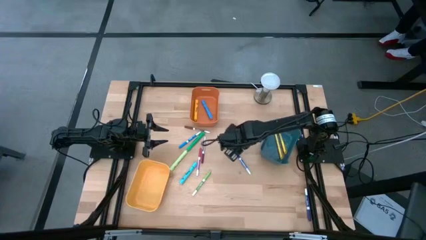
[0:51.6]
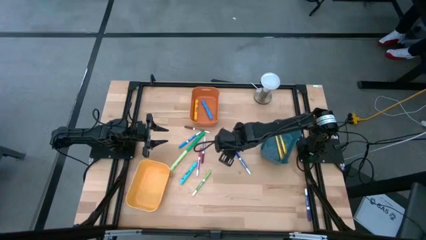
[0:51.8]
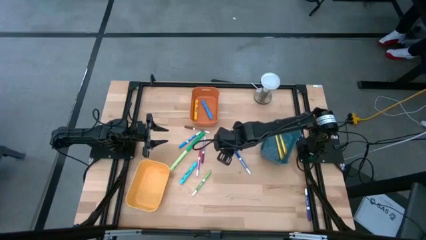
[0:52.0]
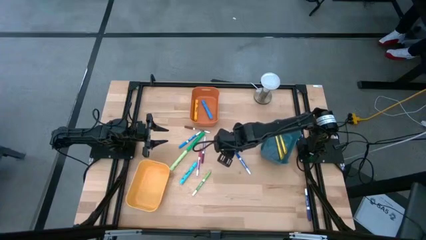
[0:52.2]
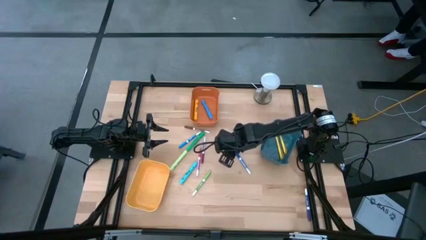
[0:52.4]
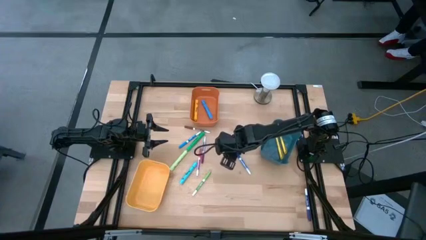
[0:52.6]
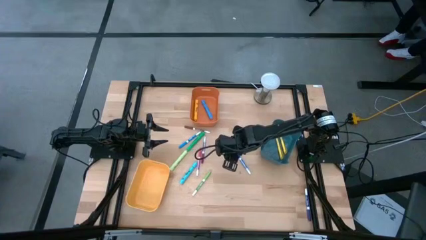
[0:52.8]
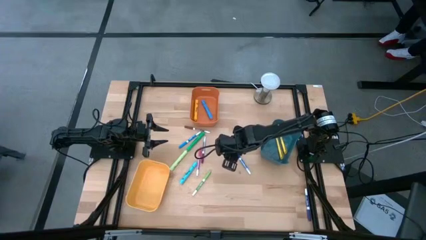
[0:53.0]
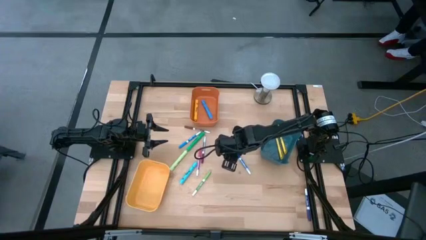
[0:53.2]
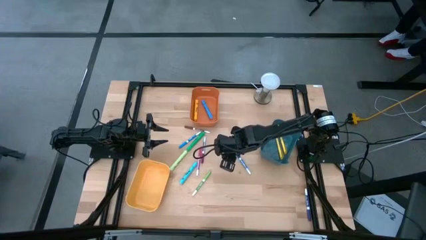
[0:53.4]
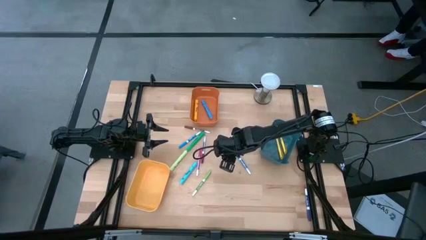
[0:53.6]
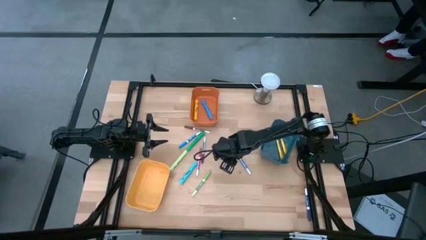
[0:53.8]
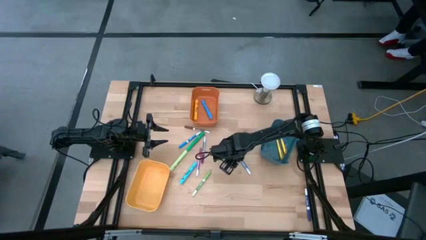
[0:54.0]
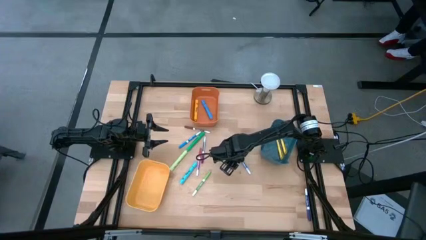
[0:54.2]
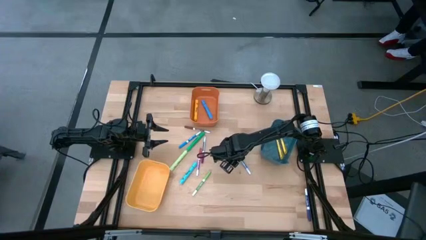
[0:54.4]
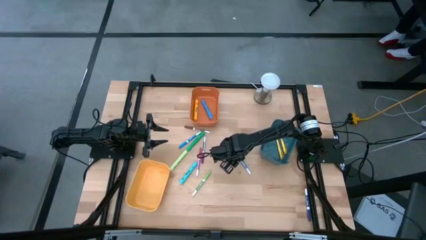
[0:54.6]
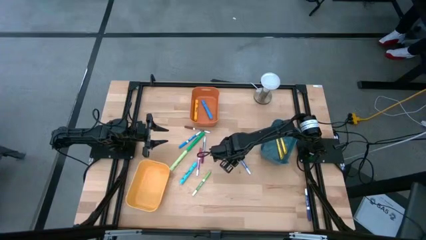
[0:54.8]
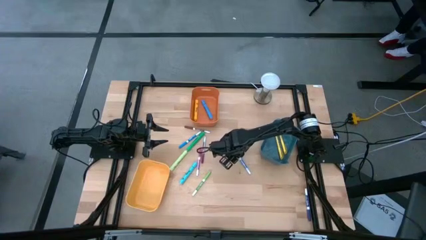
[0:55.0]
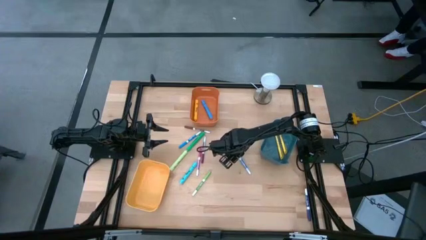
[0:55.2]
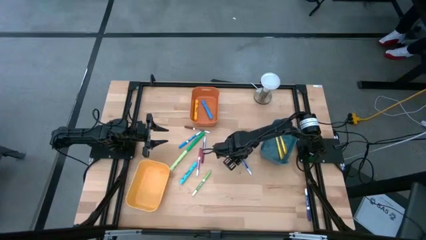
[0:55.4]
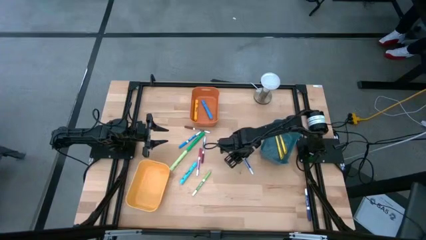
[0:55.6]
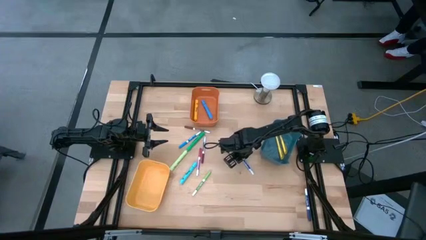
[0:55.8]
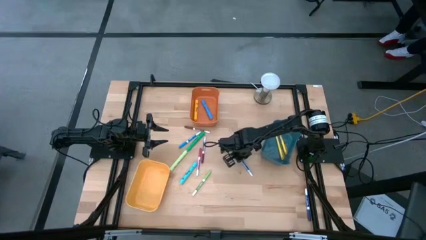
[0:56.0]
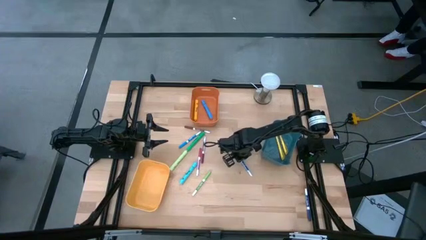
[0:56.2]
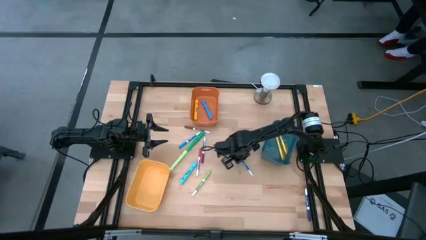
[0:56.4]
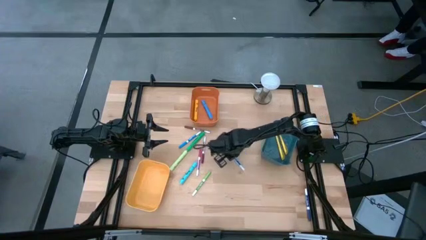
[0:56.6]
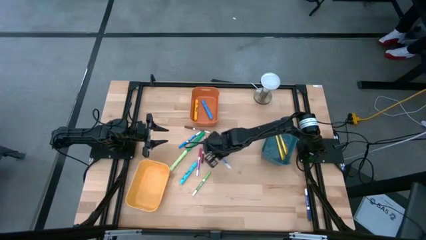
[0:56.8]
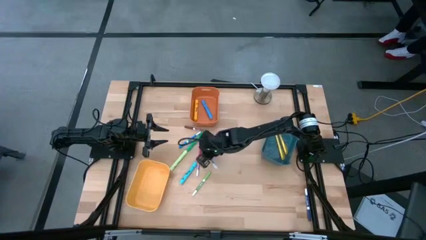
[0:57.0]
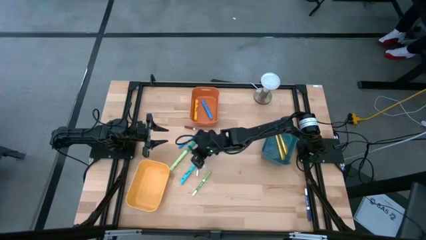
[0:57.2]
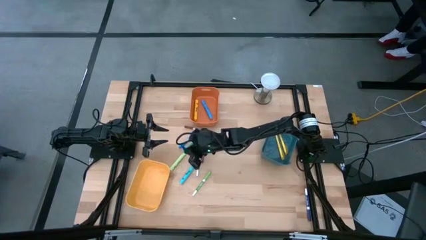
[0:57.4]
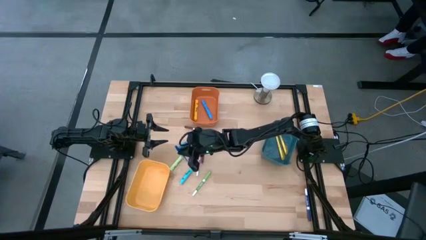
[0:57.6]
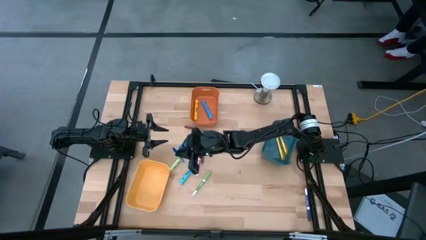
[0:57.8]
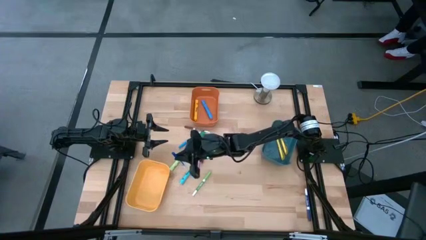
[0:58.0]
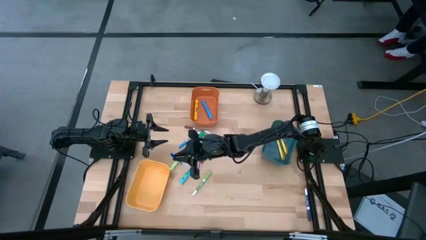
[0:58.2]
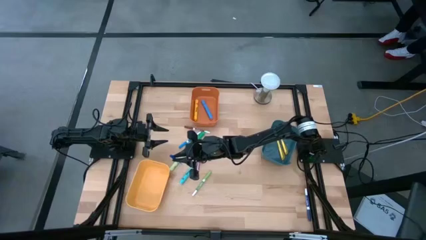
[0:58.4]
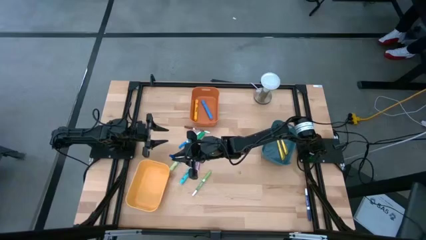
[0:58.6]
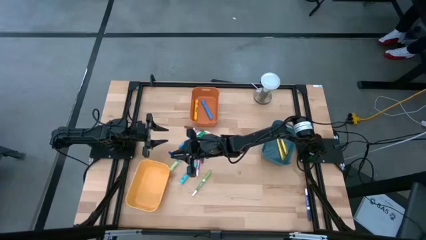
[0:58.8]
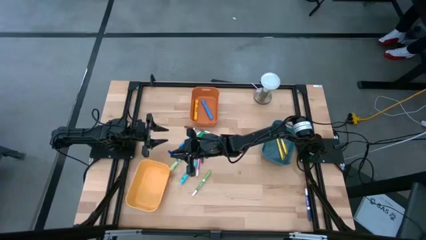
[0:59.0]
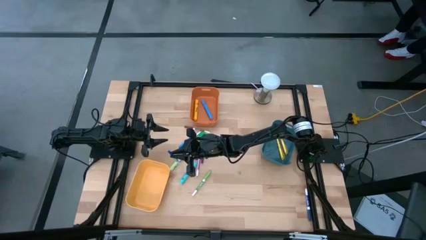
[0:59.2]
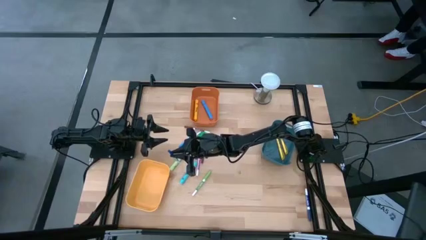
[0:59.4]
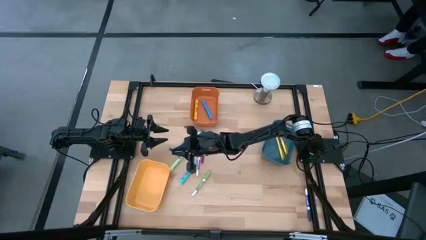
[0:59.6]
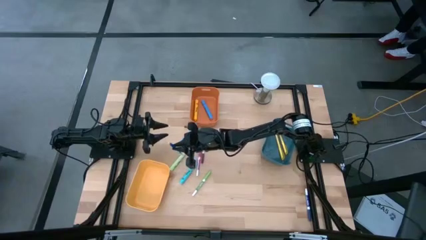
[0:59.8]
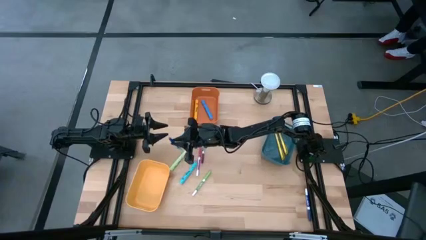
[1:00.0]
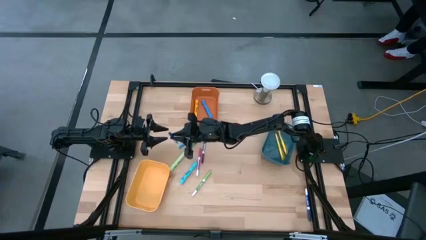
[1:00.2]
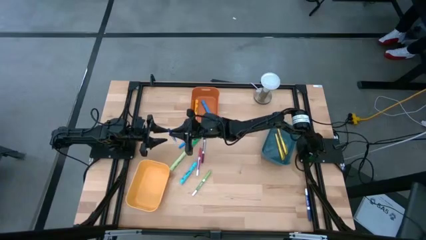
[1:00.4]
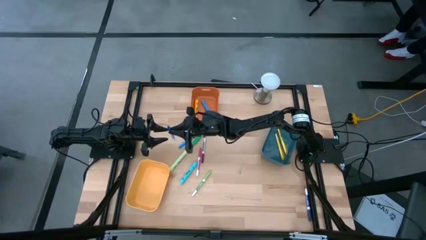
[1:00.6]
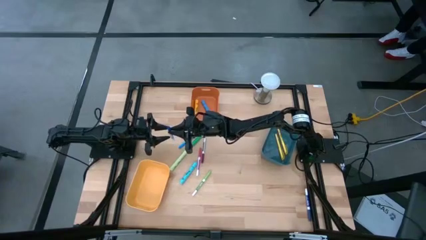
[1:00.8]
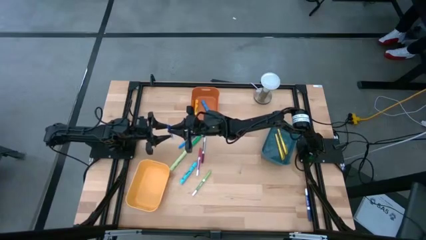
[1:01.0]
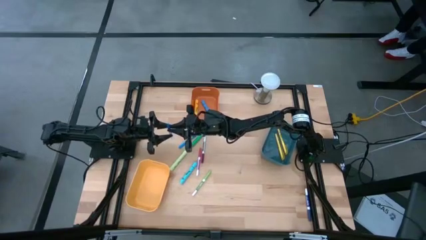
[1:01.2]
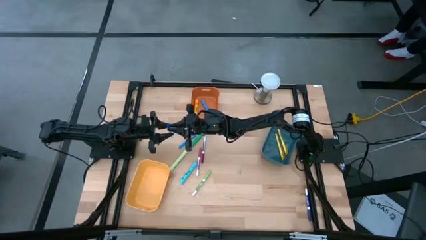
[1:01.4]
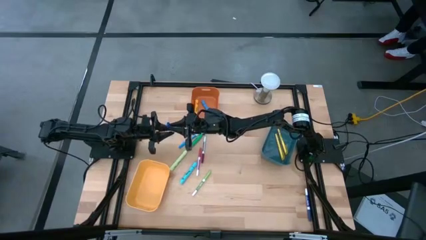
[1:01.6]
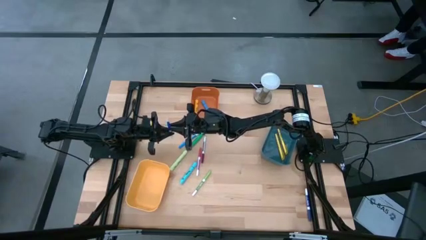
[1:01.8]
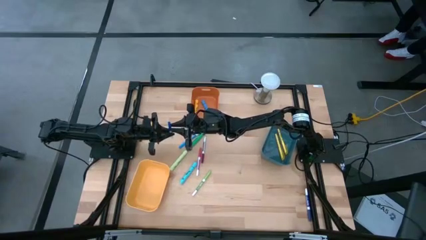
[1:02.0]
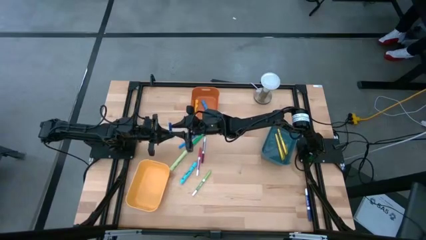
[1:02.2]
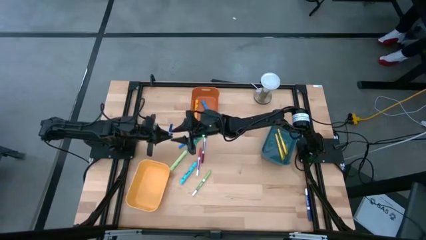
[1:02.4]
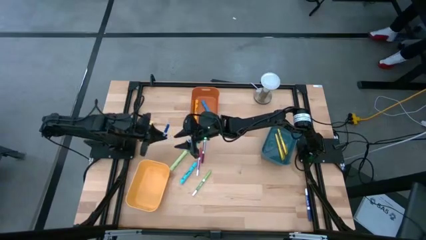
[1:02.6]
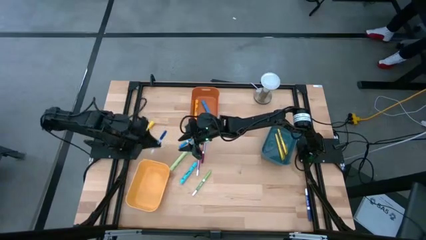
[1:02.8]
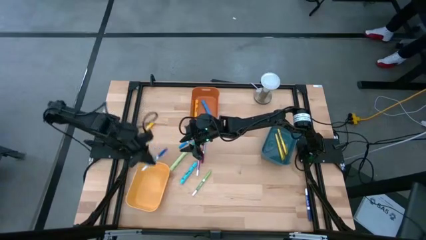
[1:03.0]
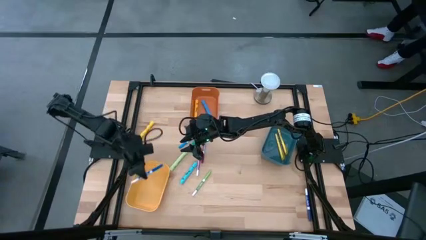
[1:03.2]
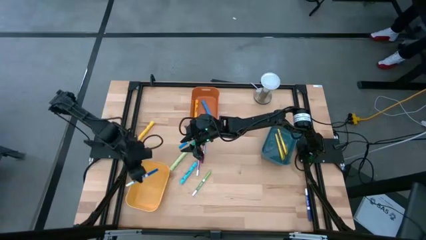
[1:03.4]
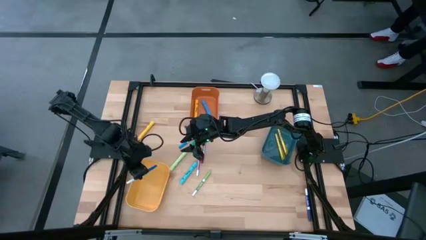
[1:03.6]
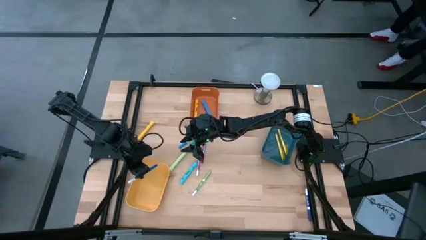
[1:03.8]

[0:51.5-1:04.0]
Task: Pick & Place Markers
Put the blue marker pen into the yellow bin
